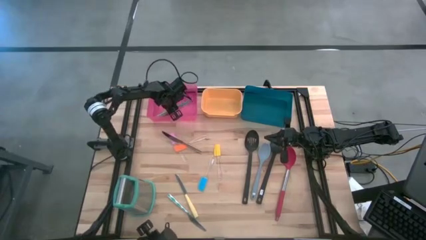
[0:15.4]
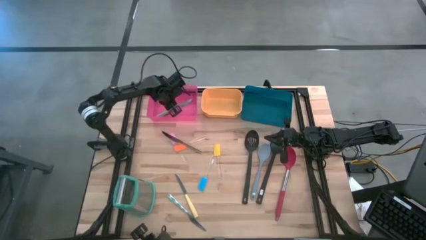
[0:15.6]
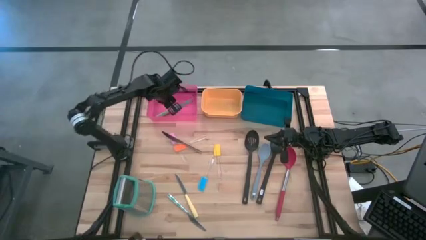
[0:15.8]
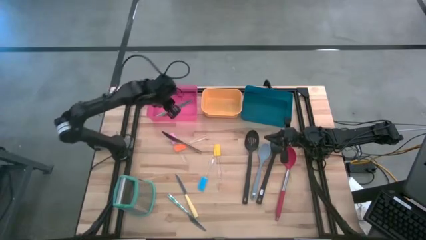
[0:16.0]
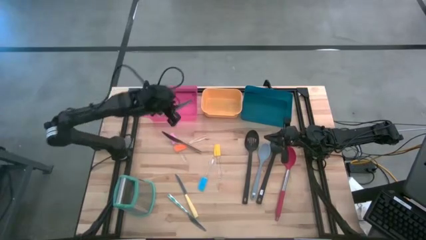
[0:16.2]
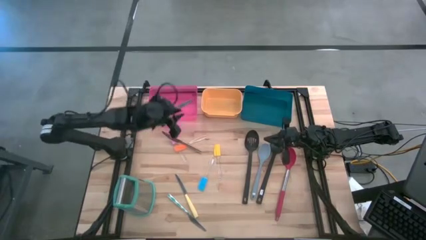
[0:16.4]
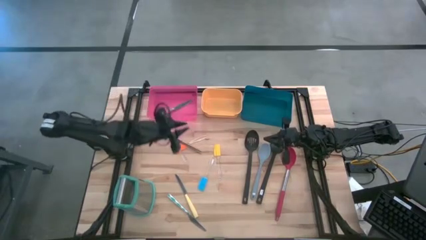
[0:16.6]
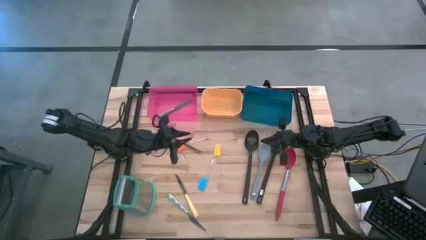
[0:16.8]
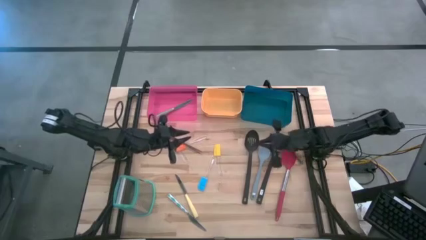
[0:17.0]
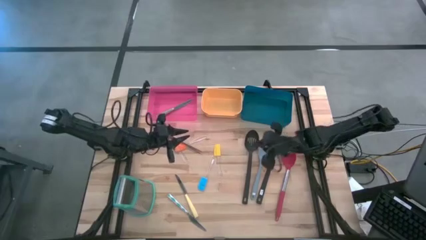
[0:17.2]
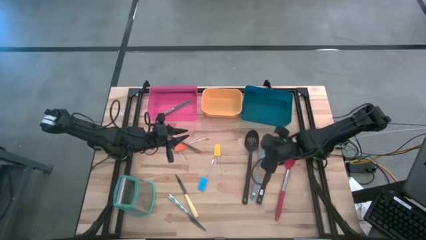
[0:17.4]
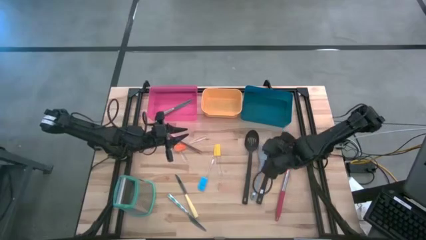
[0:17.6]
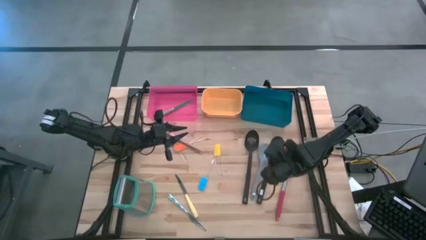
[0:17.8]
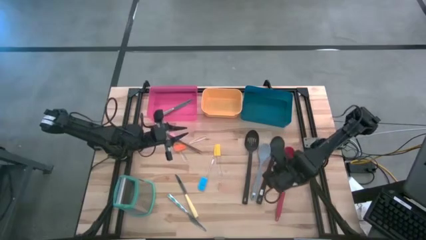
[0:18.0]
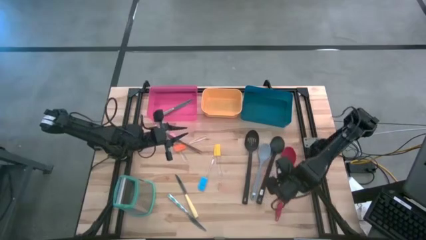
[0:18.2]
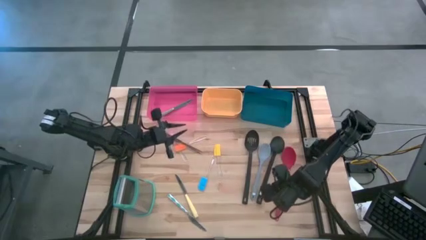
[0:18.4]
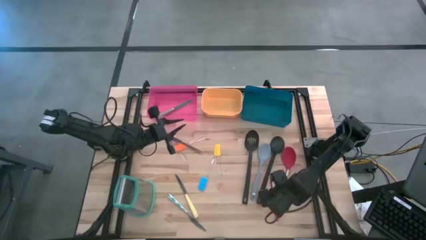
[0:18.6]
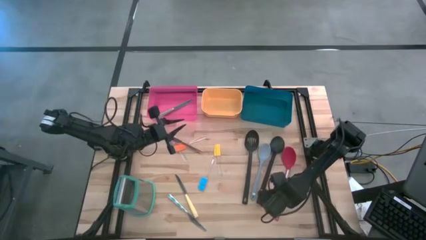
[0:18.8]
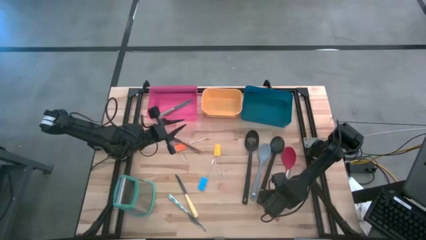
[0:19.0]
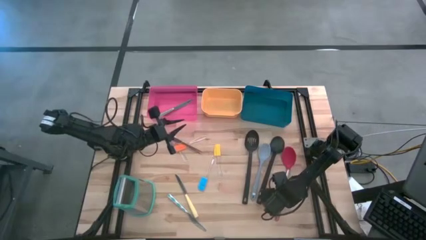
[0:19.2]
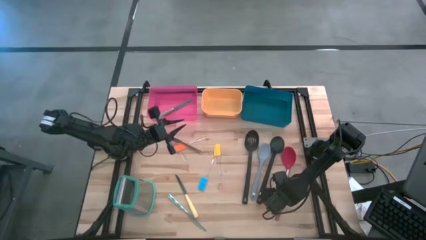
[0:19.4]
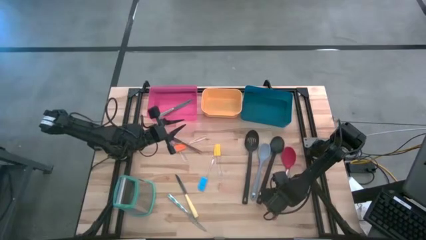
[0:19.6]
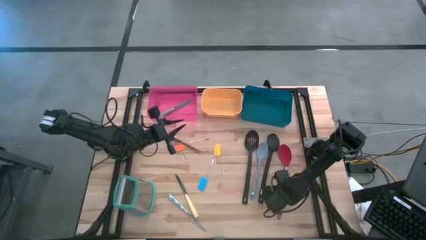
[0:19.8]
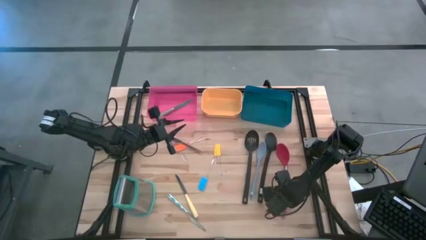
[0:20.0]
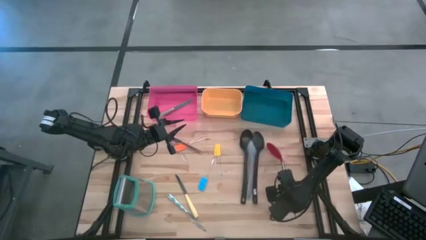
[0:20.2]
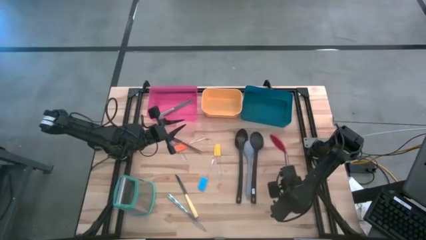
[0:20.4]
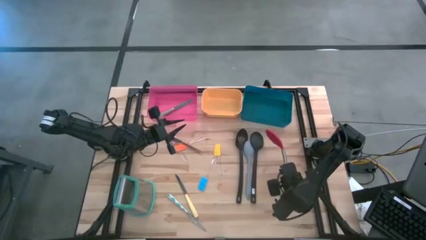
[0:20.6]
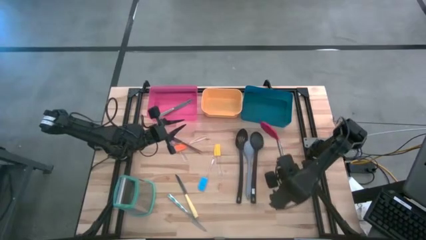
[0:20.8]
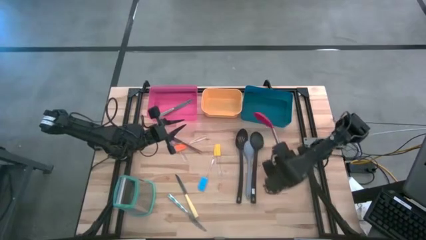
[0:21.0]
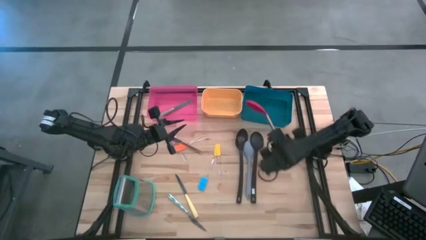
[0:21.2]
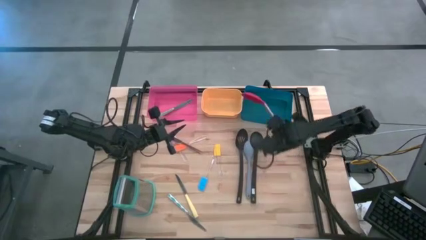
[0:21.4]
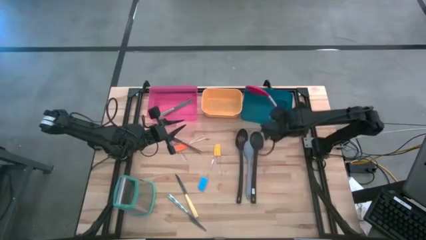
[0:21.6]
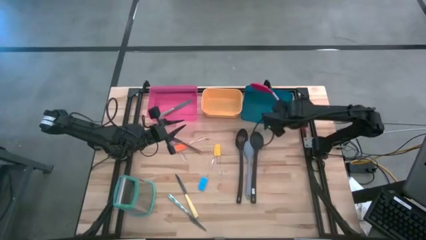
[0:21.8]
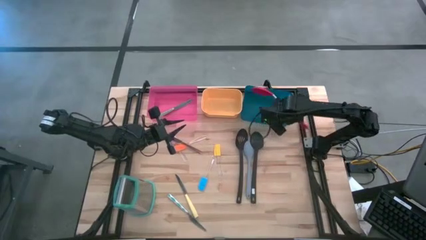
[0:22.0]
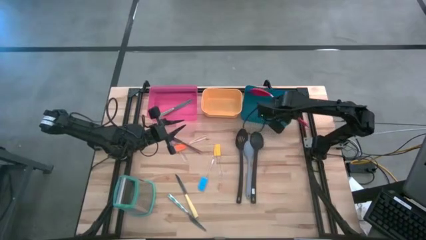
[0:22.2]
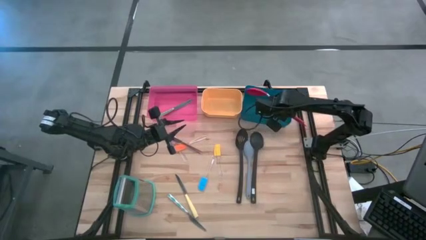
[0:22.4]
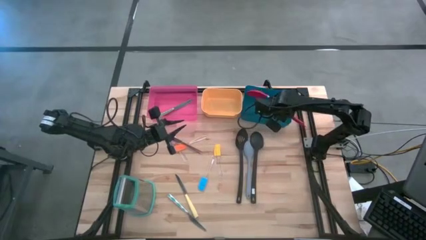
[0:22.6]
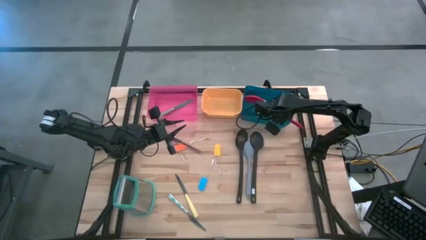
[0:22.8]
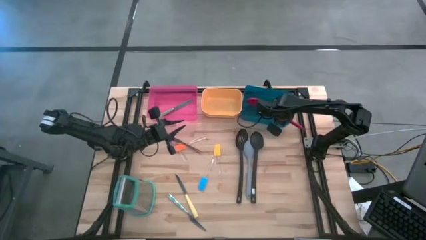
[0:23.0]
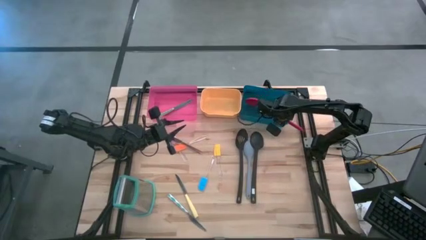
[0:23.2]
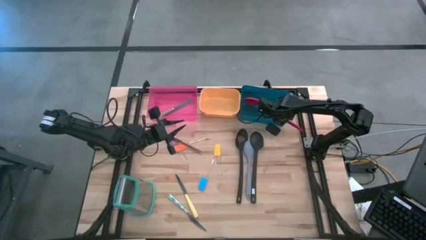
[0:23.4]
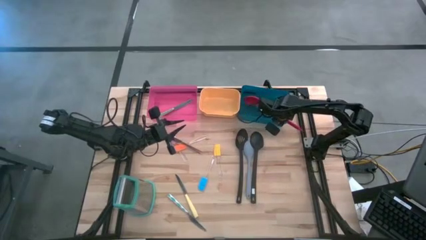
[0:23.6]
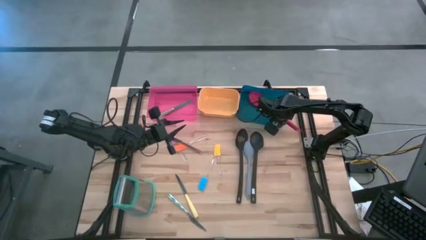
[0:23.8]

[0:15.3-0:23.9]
Task: Pick & Place Kitchen Items
Put the red spoon into the blue bin

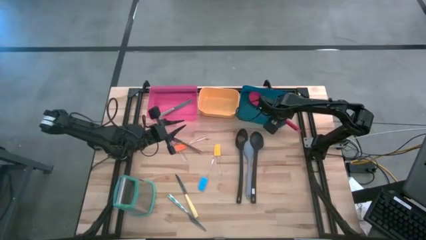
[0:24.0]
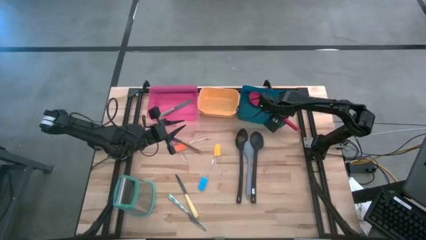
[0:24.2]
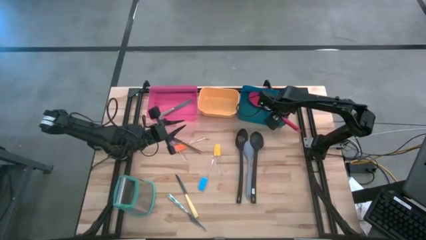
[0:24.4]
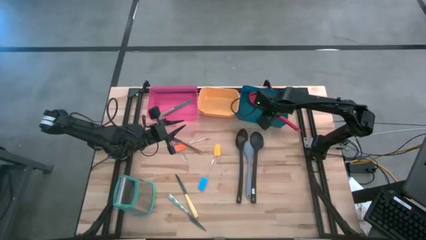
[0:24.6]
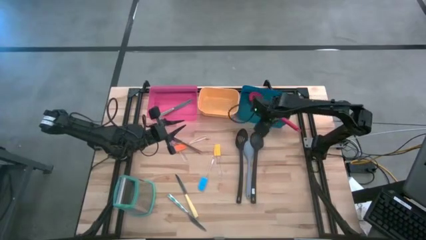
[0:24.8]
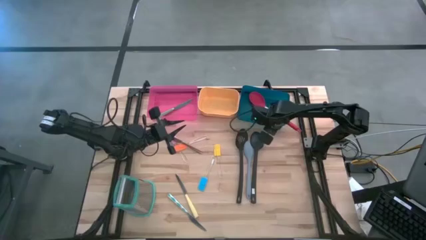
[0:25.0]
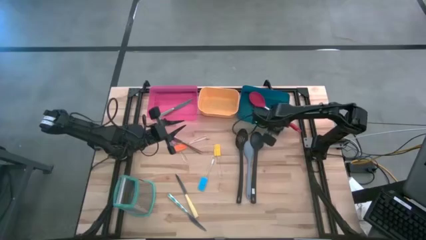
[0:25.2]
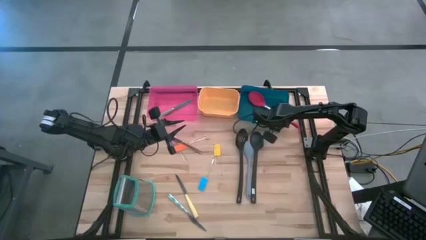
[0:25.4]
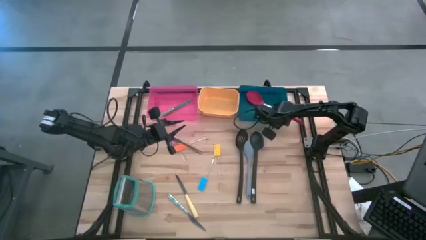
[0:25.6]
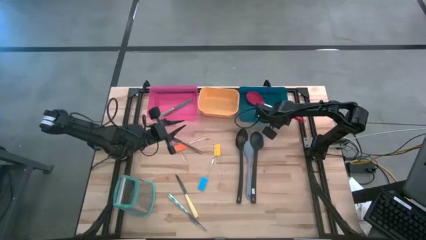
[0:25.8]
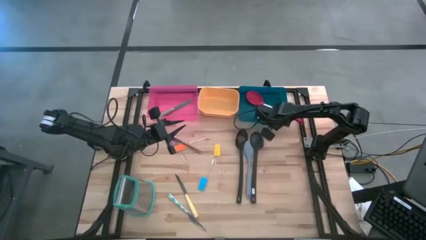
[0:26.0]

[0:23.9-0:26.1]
Adjust the blue bin

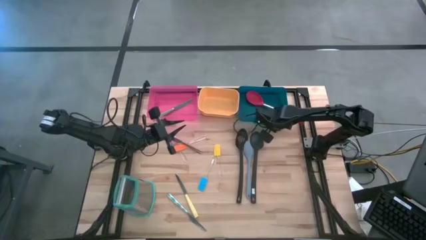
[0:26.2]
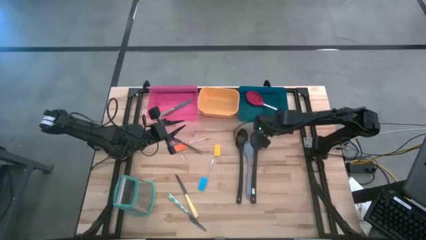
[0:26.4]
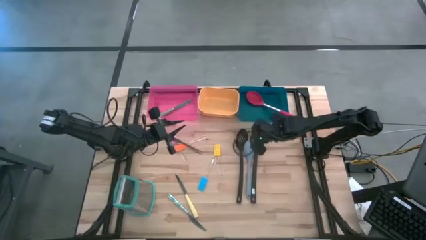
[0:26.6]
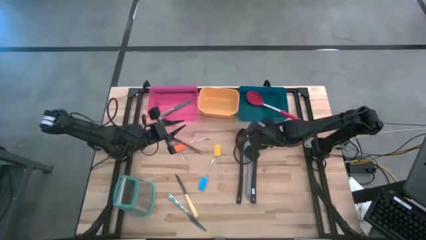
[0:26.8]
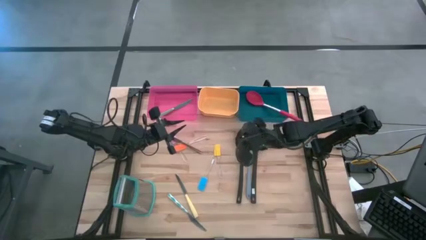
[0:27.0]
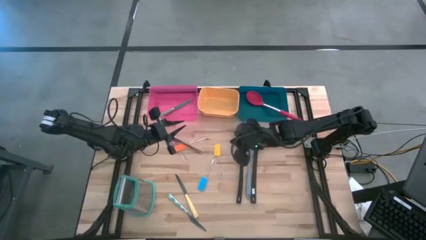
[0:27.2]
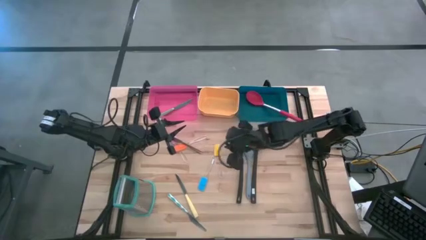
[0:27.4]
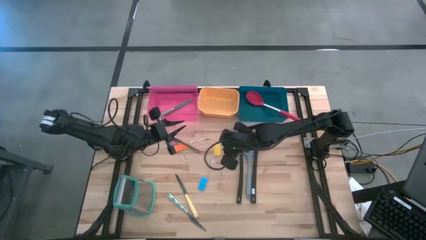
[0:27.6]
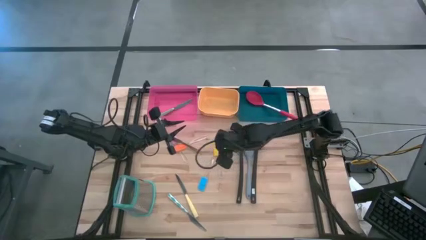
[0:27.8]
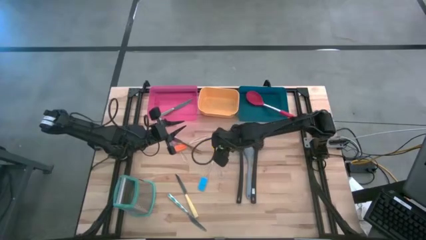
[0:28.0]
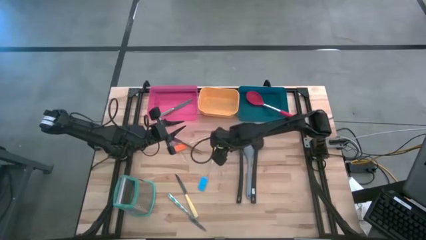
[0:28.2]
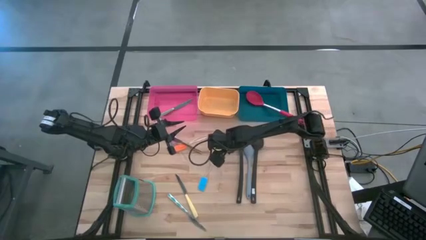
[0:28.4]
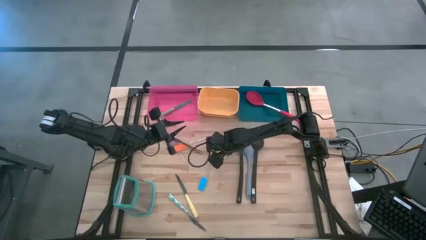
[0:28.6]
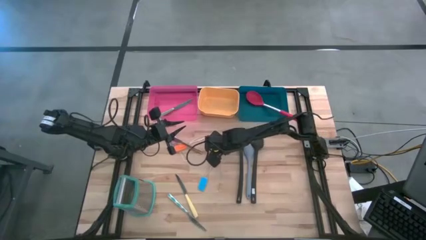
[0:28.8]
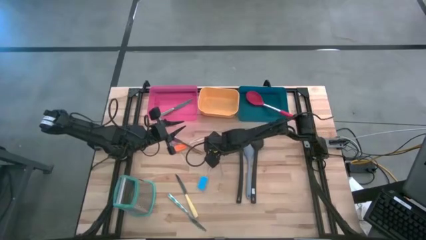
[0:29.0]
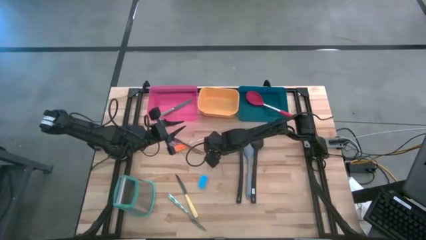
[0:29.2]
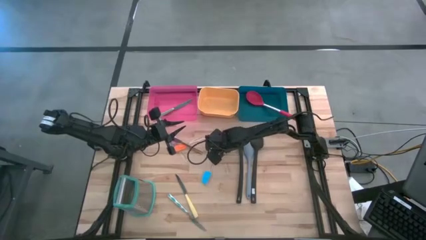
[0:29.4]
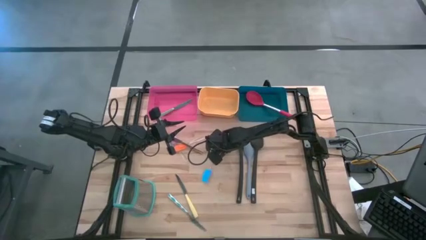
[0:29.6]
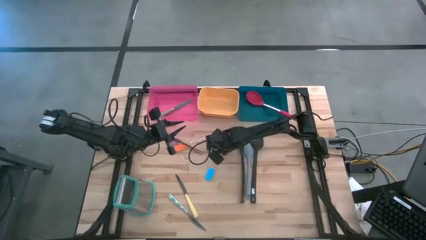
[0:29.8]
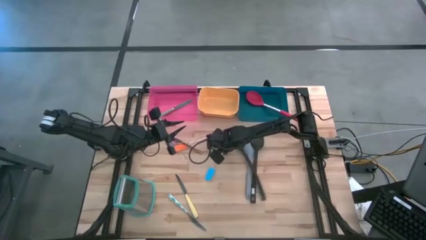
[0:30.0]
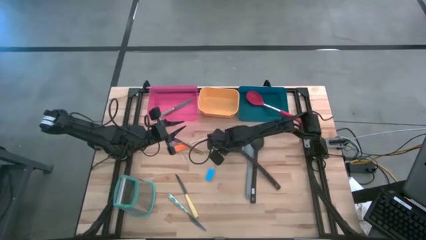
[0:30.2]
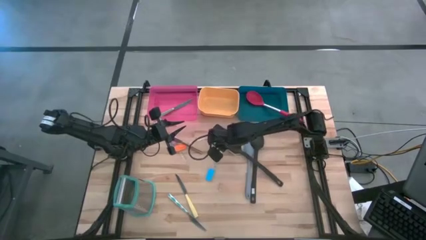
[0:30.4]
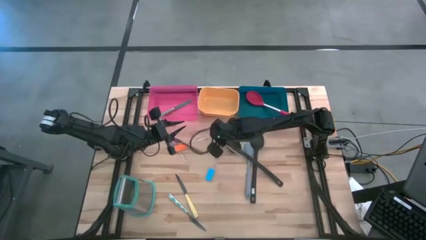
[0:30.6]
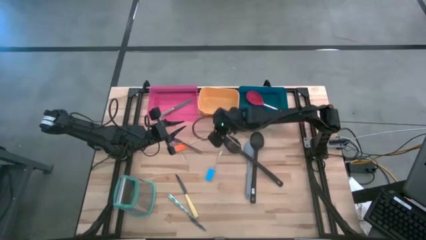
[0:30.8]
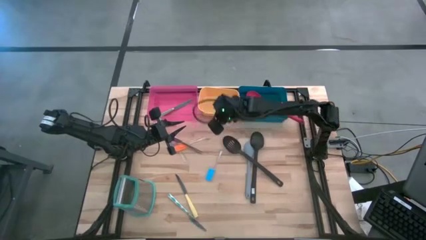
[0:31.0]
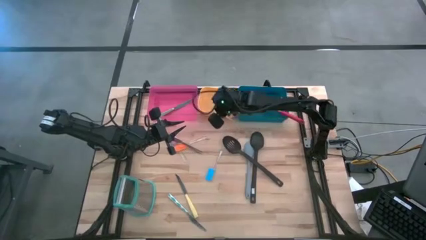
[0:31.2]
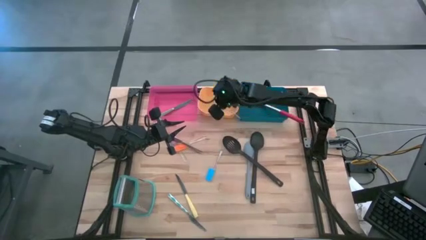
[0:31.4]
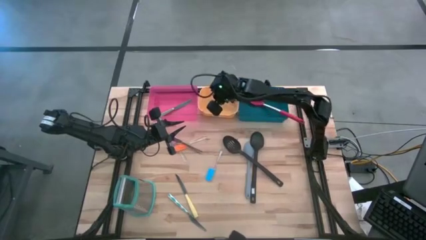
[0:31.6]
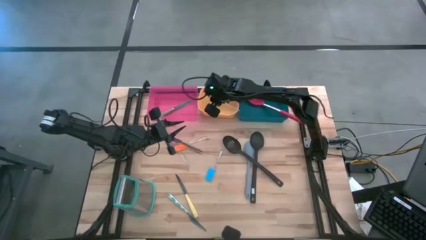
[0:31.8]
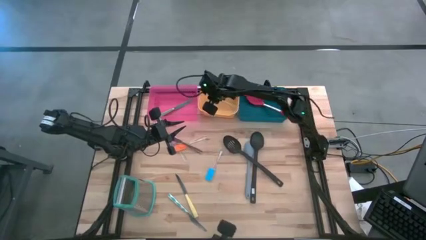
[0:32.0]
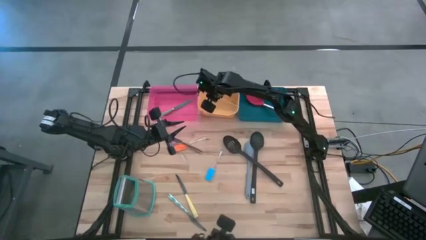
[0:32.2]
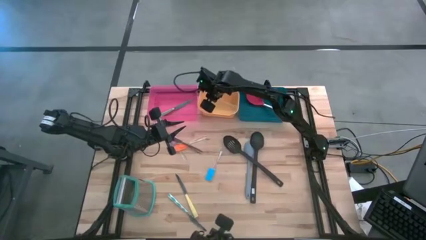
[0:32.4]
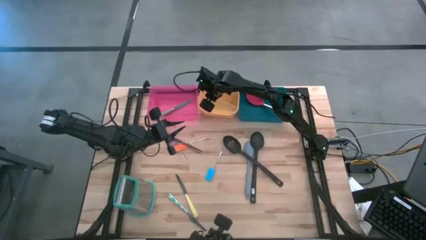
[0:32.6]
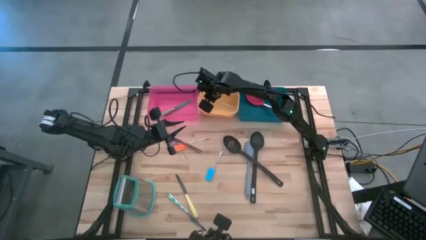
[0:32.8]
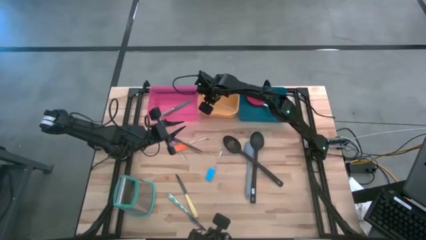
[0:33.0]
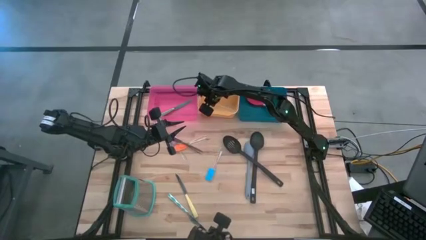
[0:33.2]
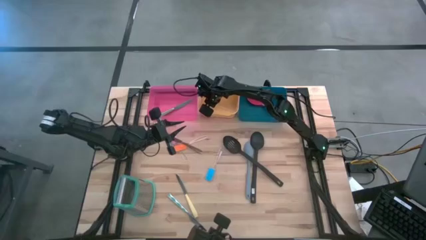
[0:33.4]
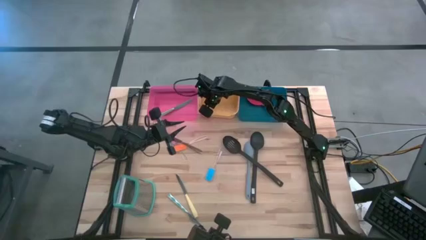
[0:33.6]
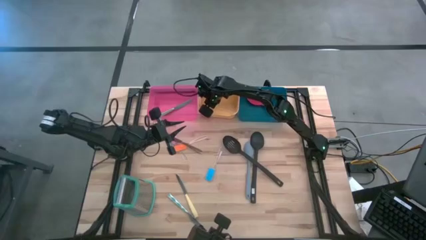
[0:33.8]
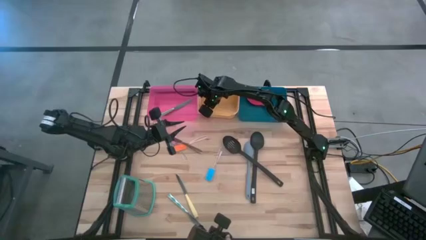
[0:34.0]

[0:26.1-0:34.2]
Put the yellow spatula into the yellow bin
